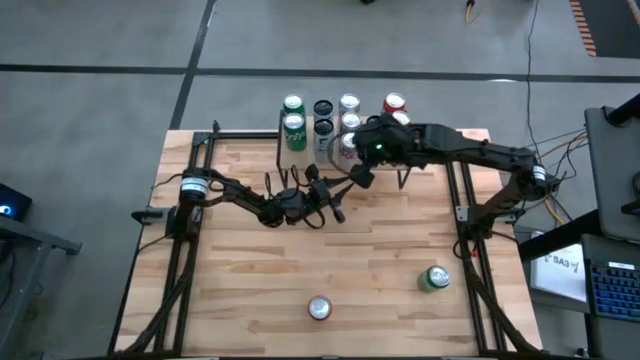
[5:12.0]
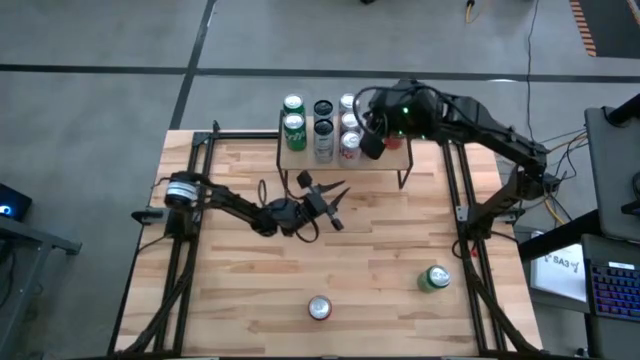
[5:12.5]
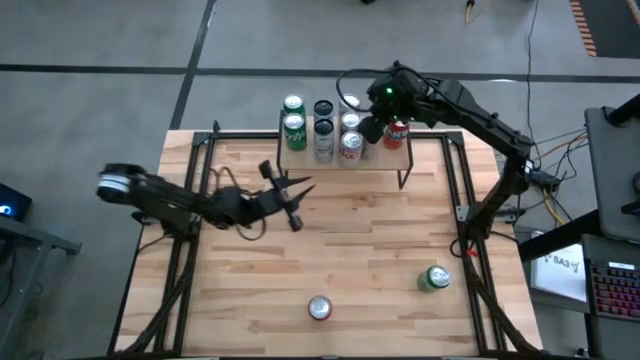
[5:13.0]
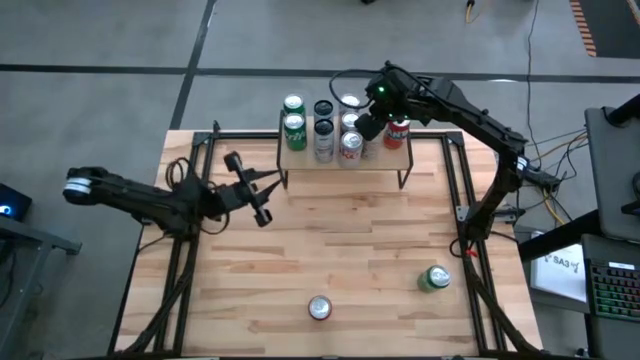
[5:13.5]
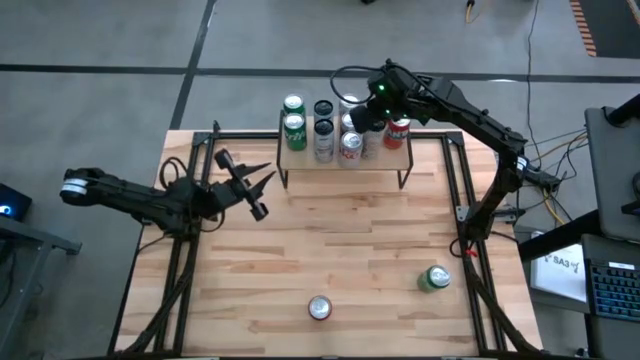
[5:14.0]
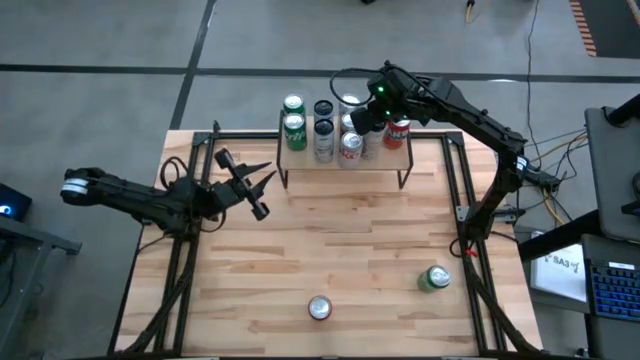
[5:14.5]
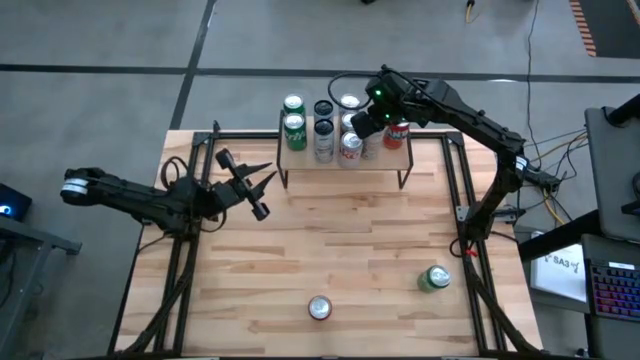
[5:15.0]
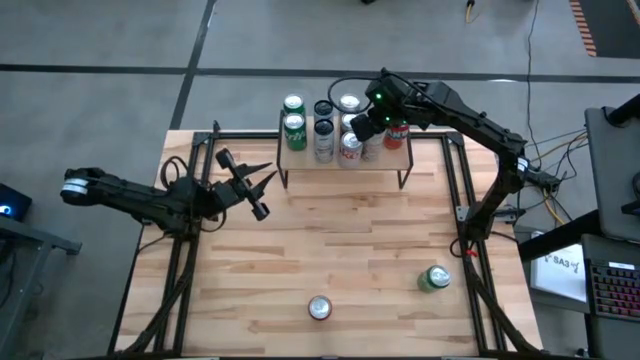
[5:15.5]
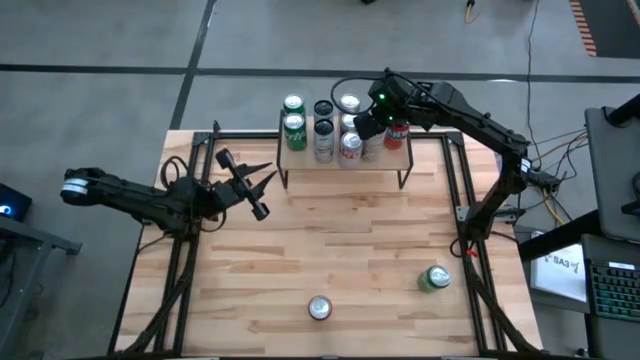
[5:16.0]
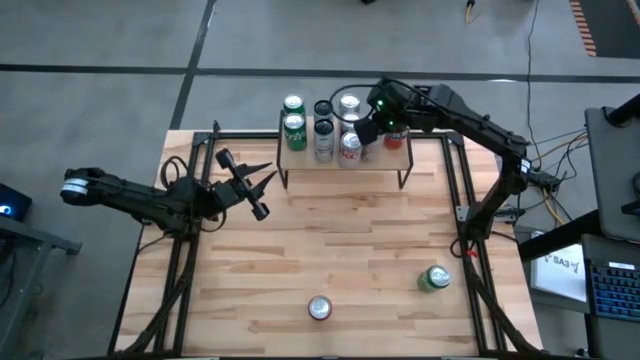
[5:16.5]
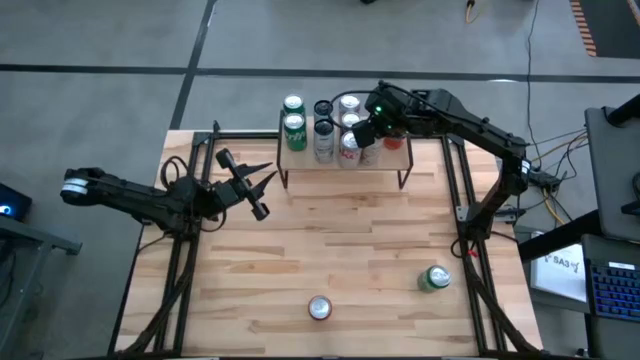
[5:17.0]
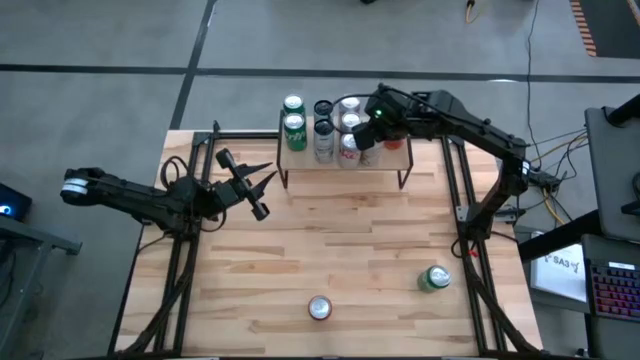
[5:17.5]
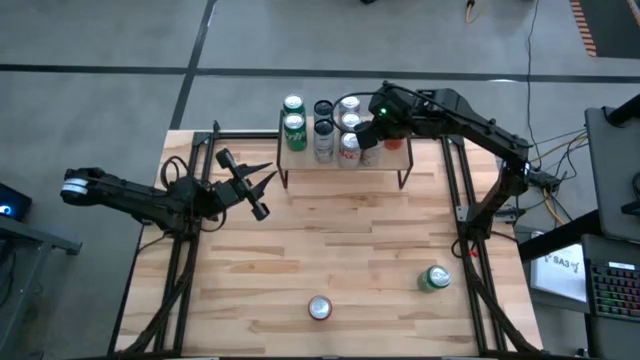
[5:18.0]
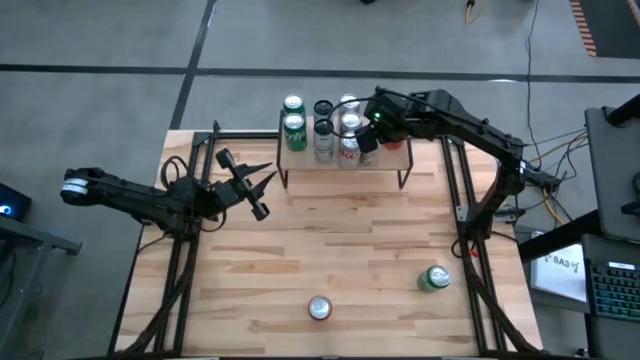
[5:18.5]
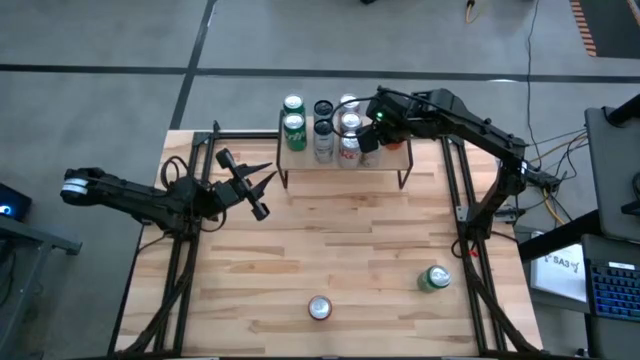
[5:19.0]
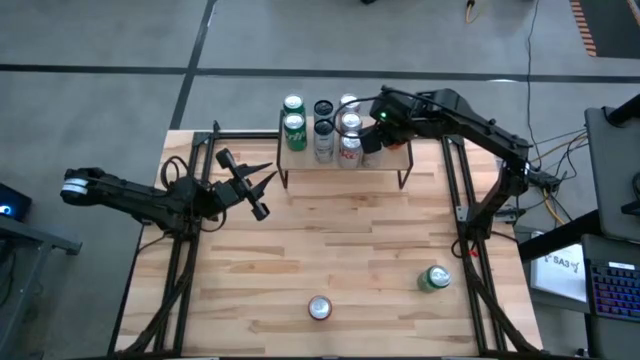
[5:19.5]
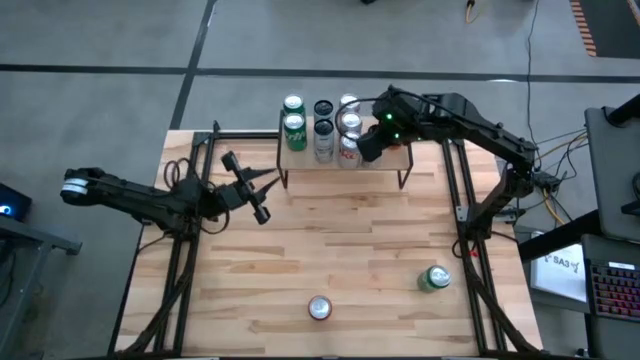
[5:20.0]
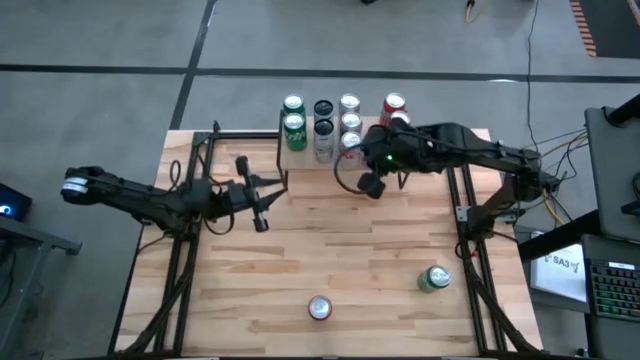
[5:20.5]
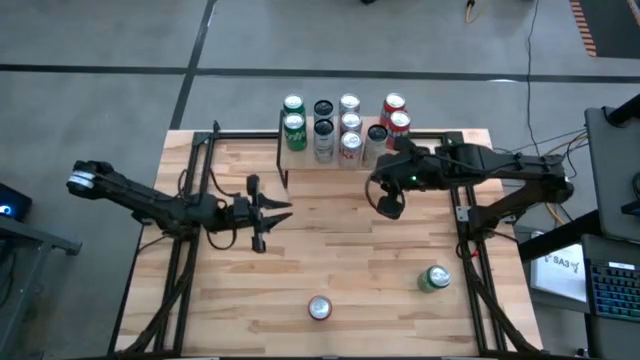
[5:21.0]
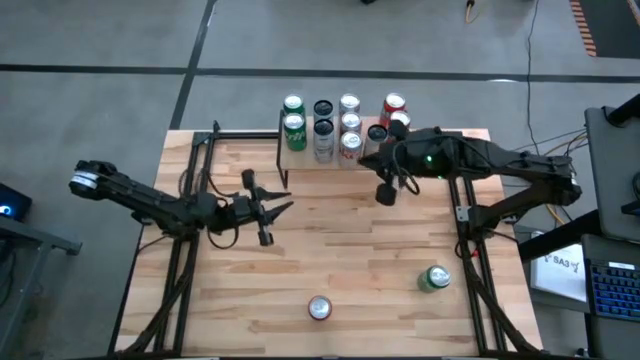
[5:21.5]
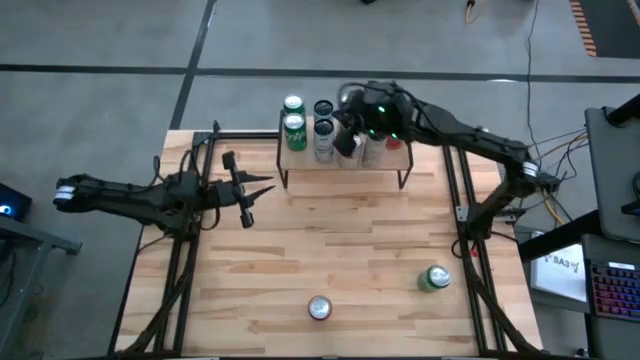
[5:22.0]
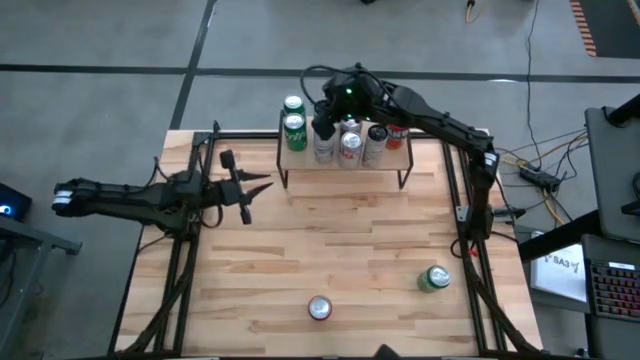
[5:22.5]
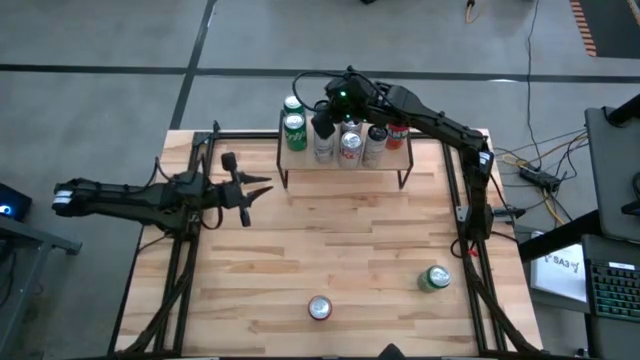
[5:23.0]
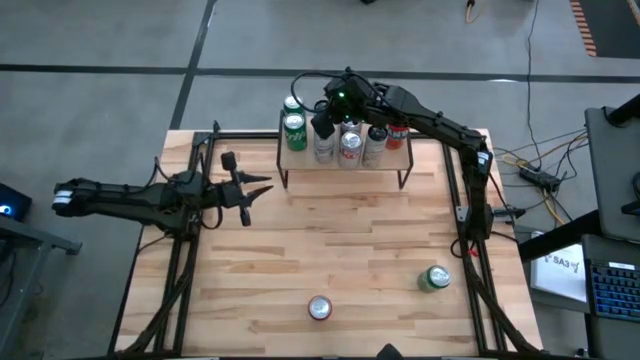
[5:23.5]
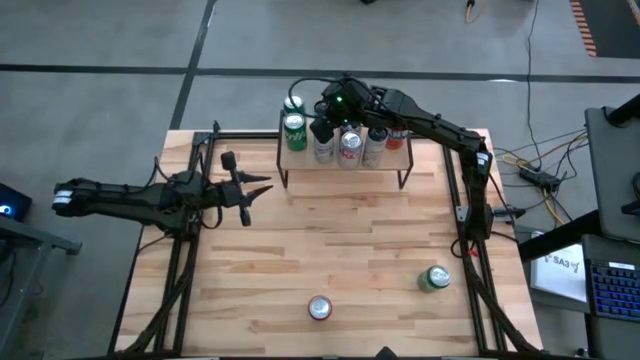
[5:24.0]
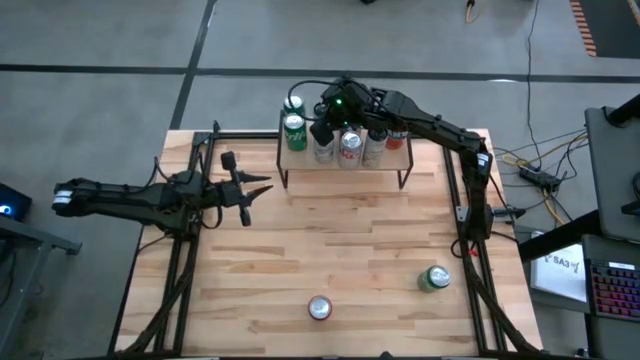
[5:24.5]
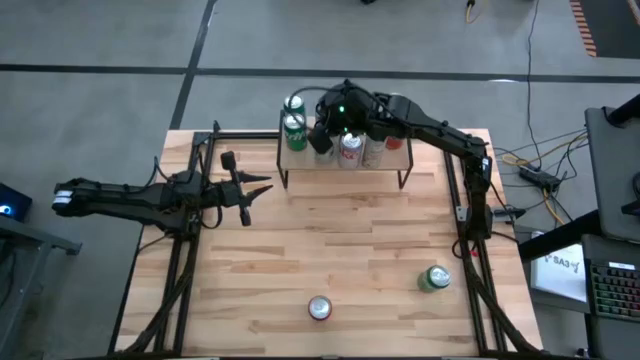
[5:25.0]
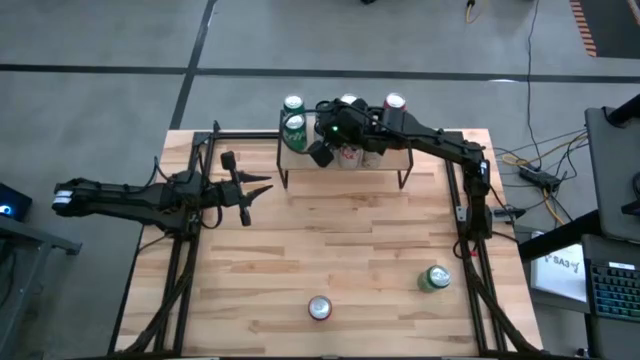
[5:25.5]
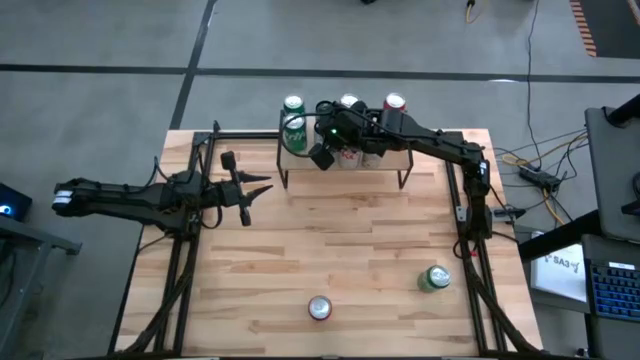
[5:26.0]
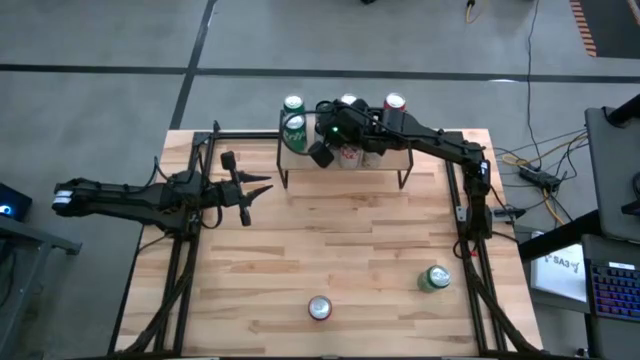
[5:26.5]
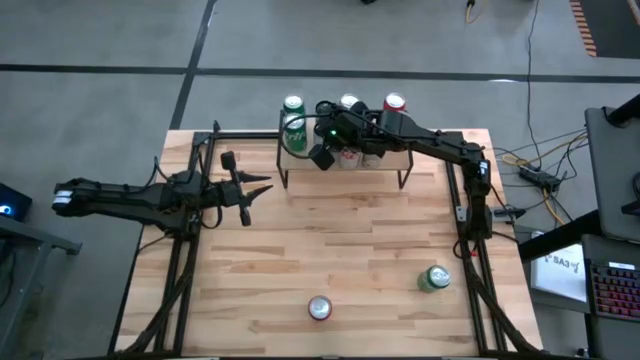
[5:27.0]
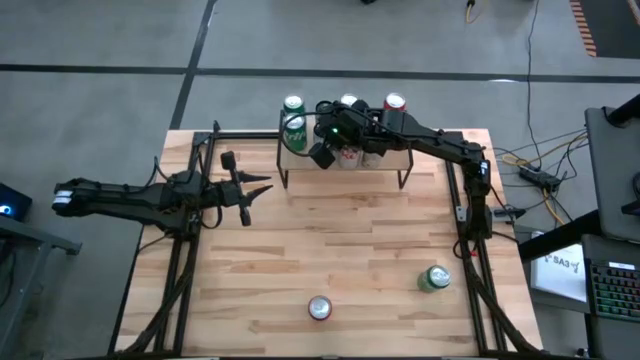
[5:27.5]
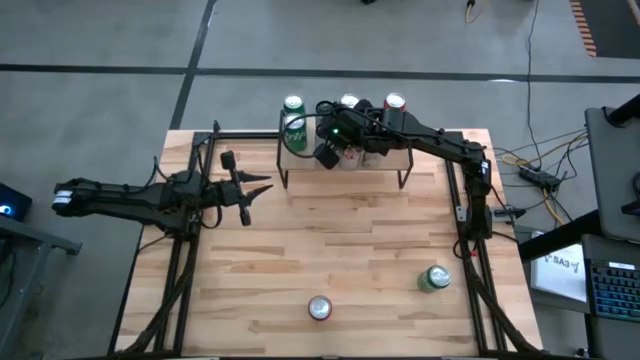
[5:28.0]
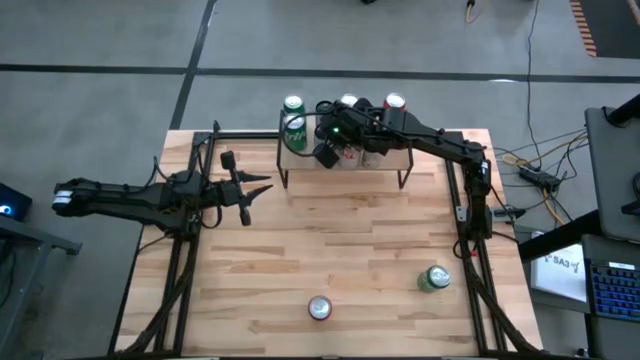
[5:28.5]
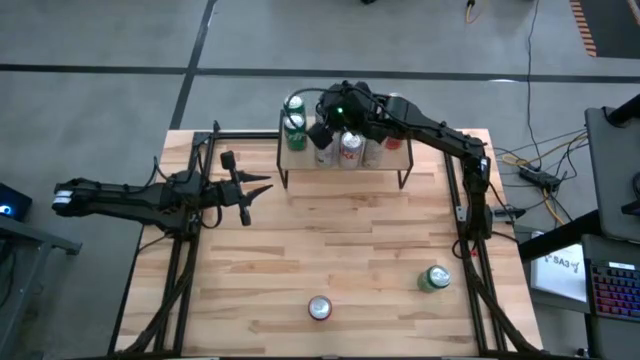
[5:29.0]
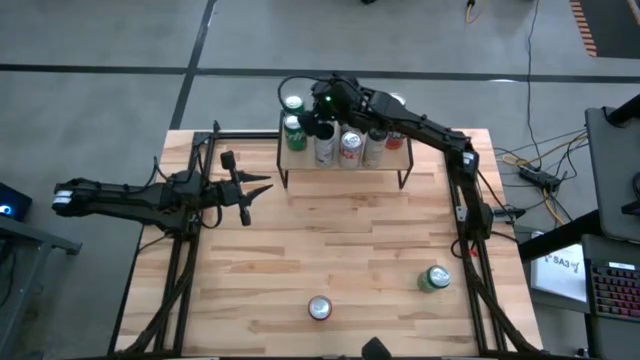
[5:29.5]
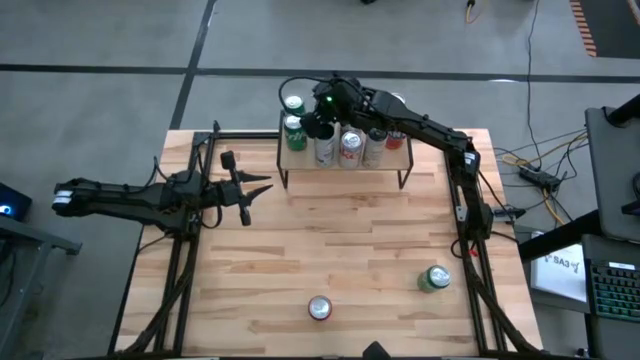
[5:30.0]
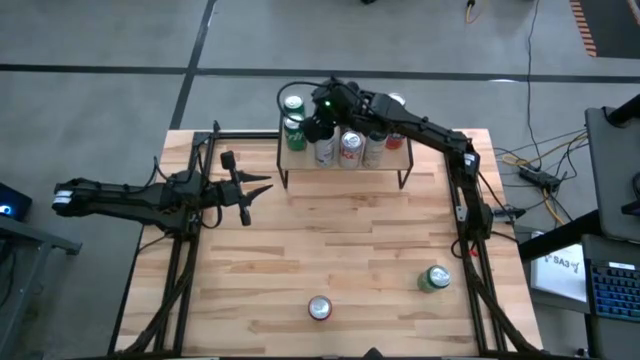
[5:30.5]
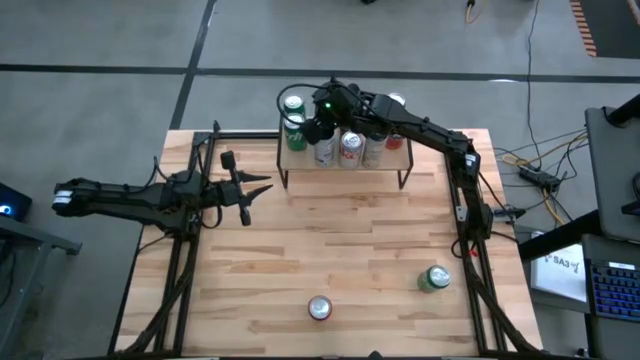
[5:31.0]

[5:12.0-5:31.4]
Task: Place canned beverage on shelf
Adjust the soda cans on the shelf
